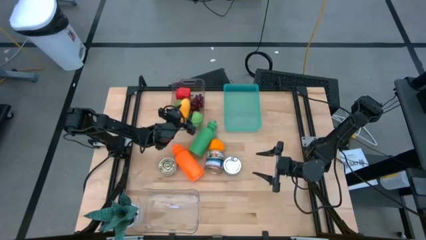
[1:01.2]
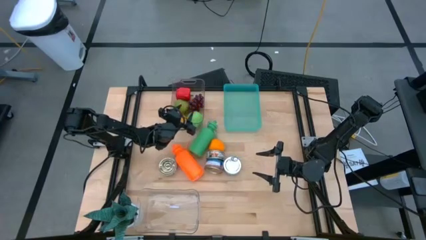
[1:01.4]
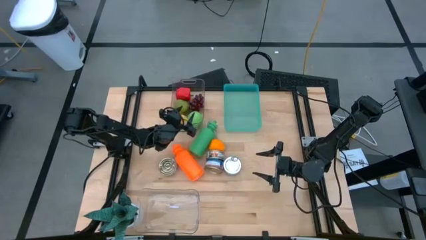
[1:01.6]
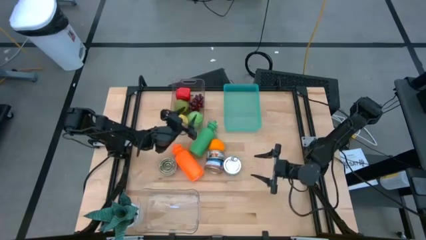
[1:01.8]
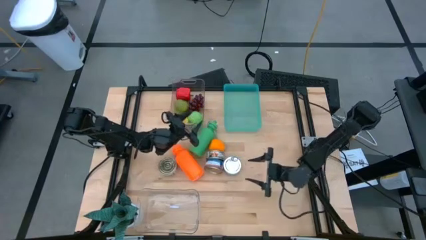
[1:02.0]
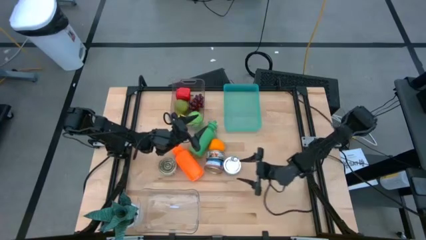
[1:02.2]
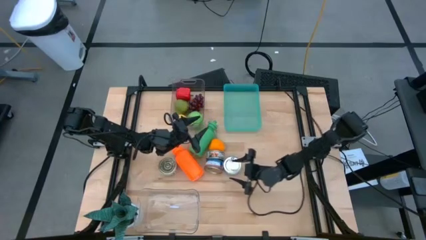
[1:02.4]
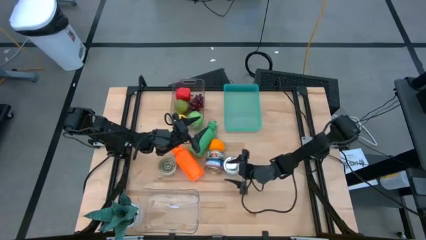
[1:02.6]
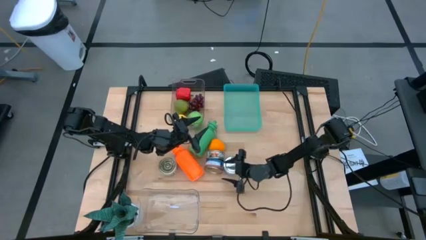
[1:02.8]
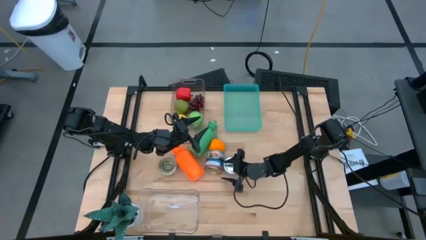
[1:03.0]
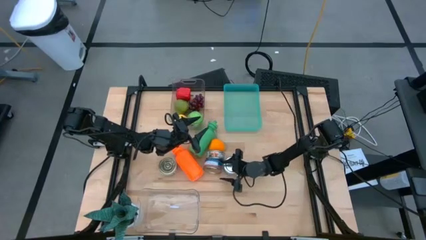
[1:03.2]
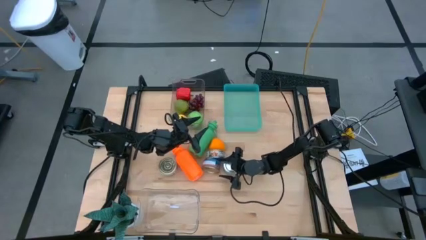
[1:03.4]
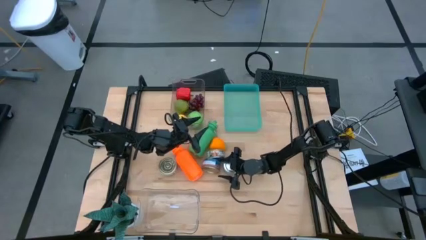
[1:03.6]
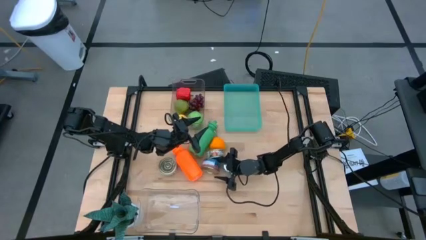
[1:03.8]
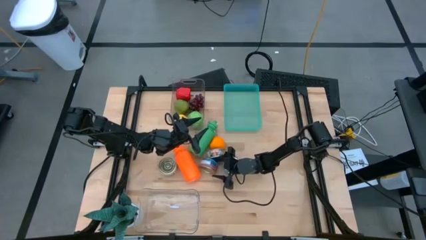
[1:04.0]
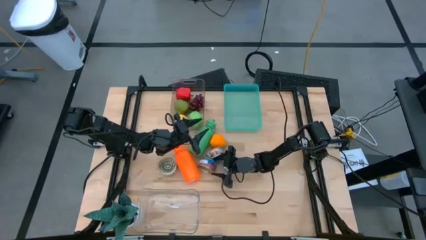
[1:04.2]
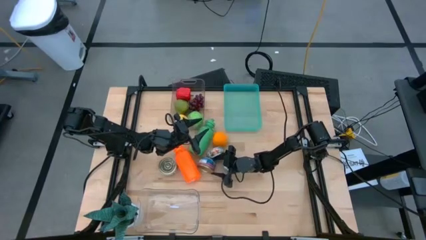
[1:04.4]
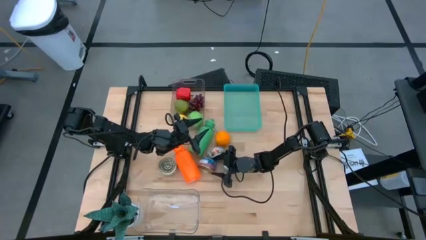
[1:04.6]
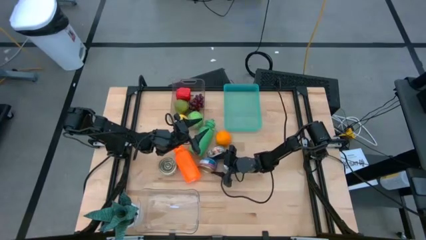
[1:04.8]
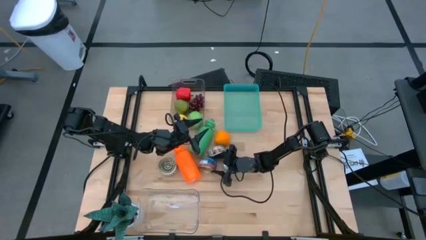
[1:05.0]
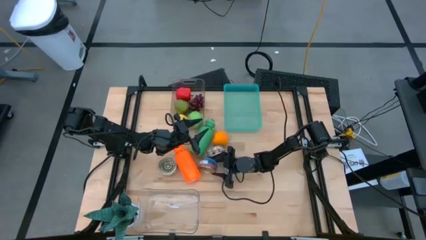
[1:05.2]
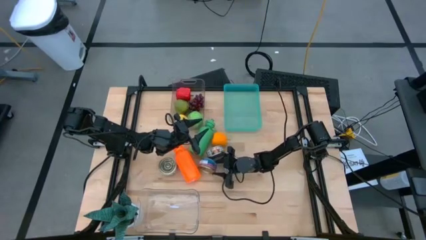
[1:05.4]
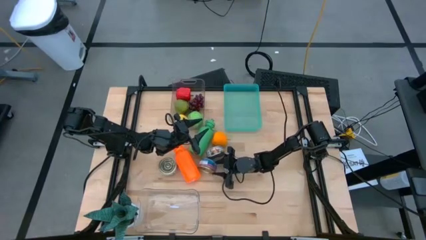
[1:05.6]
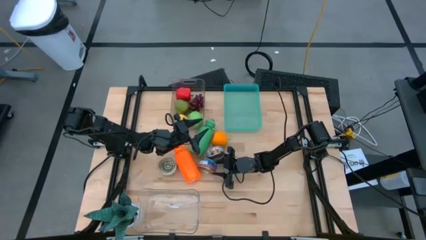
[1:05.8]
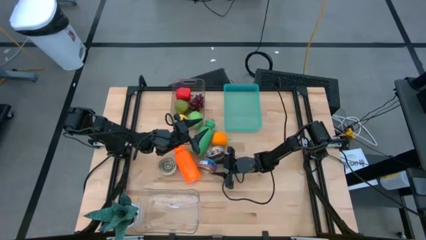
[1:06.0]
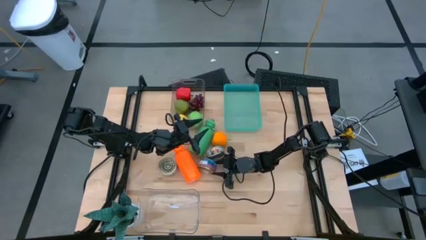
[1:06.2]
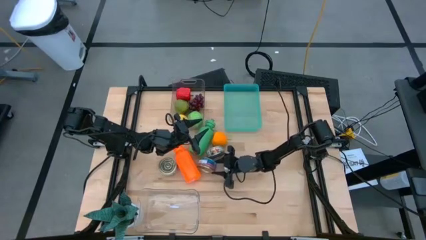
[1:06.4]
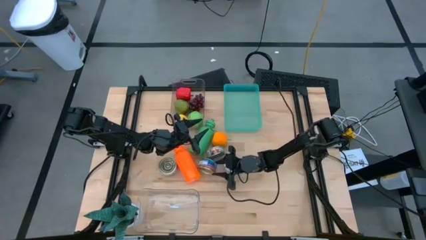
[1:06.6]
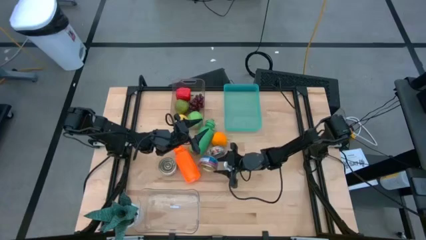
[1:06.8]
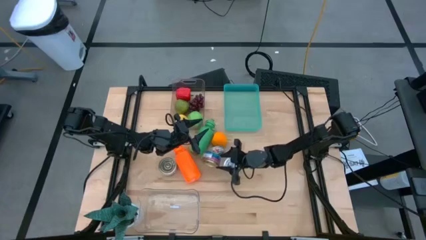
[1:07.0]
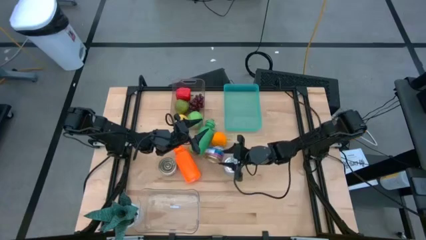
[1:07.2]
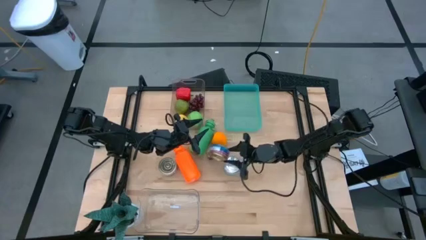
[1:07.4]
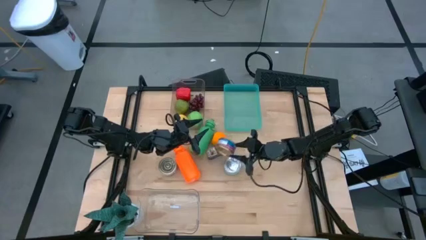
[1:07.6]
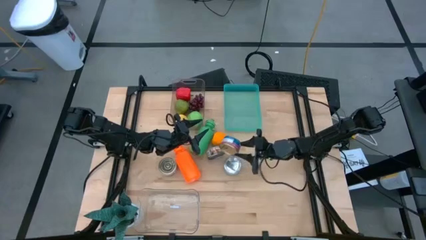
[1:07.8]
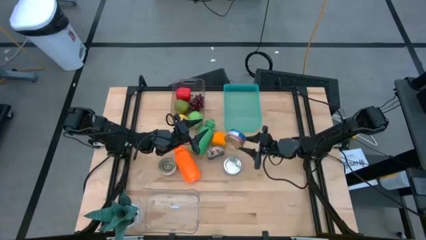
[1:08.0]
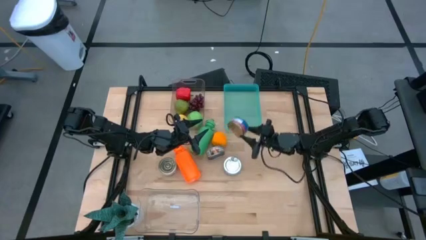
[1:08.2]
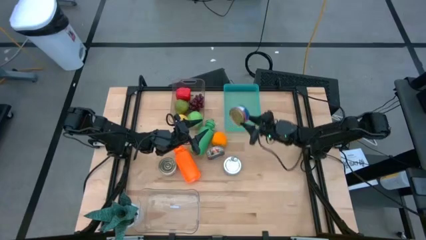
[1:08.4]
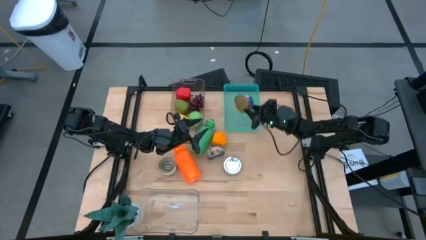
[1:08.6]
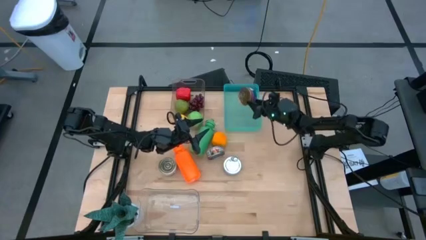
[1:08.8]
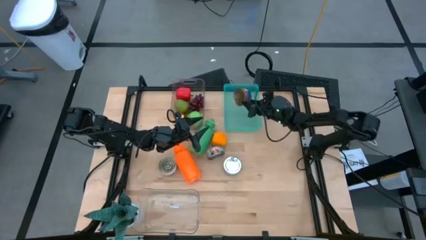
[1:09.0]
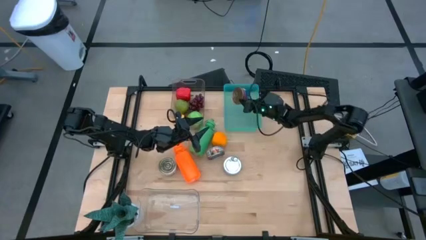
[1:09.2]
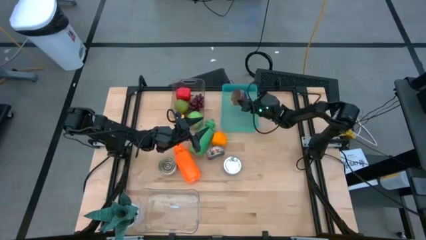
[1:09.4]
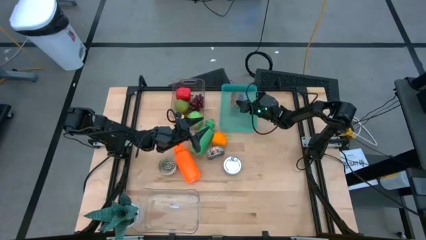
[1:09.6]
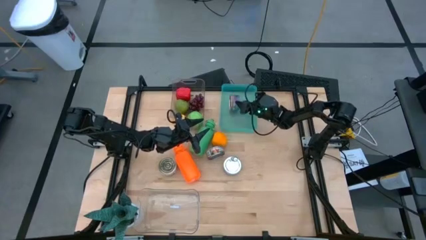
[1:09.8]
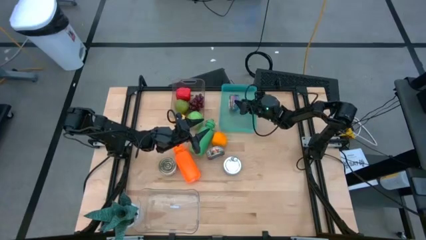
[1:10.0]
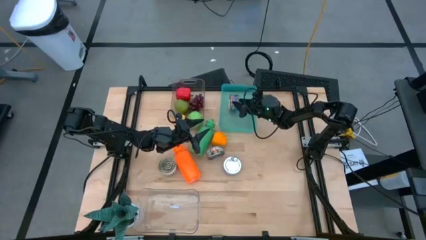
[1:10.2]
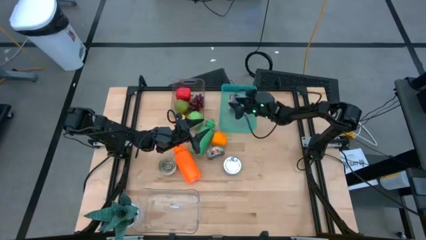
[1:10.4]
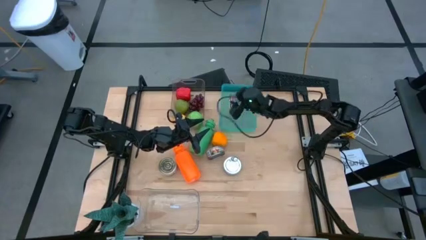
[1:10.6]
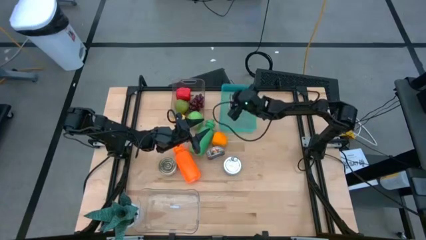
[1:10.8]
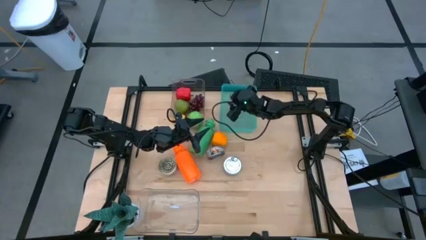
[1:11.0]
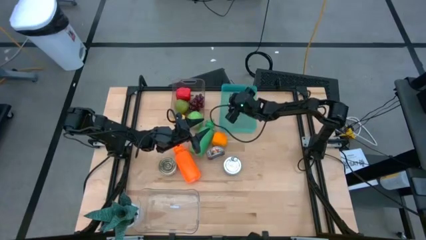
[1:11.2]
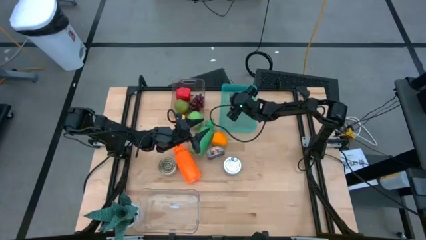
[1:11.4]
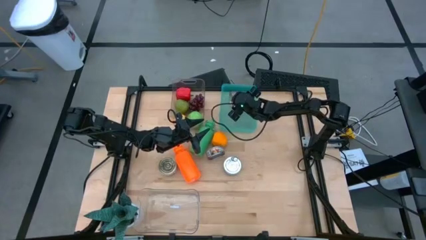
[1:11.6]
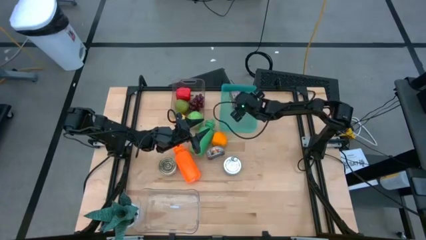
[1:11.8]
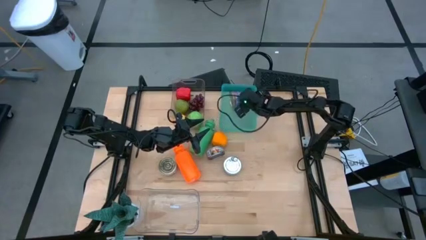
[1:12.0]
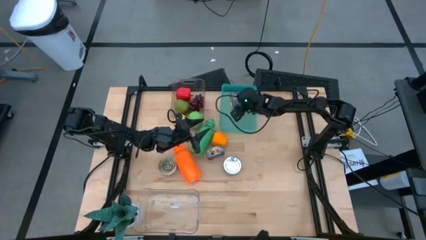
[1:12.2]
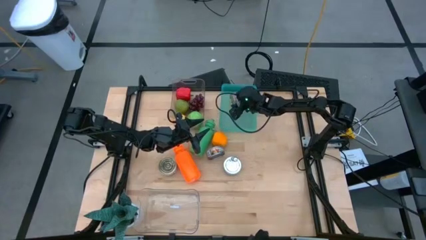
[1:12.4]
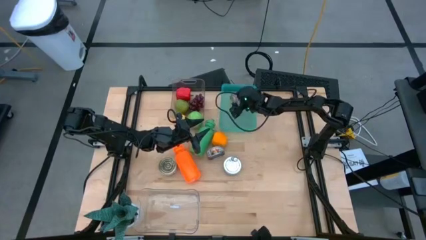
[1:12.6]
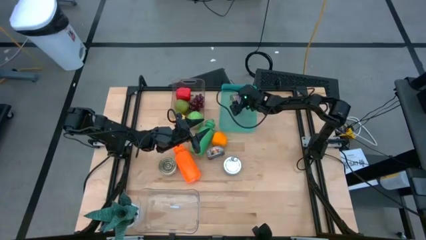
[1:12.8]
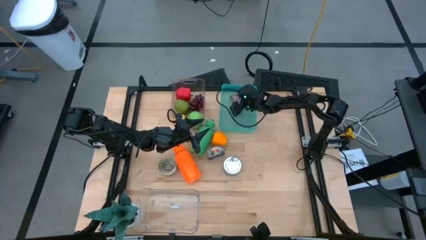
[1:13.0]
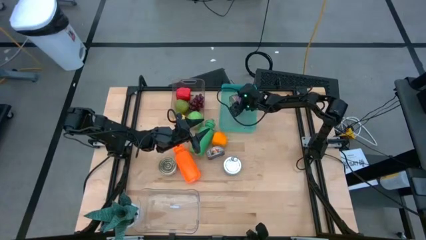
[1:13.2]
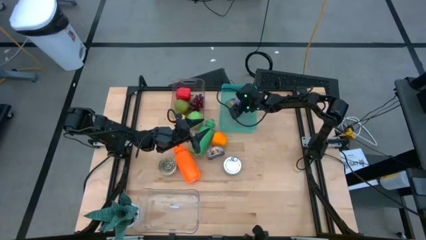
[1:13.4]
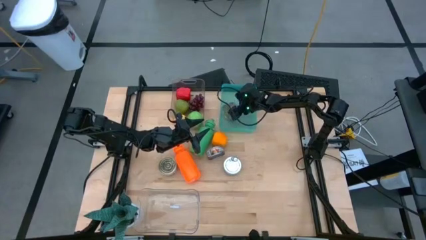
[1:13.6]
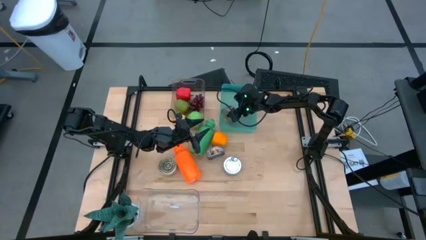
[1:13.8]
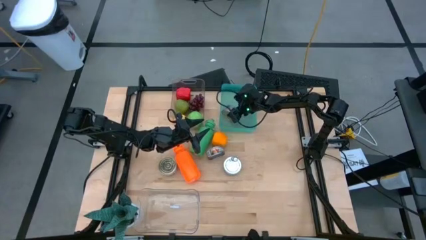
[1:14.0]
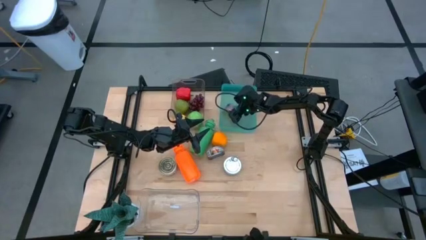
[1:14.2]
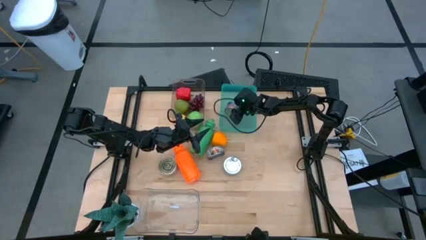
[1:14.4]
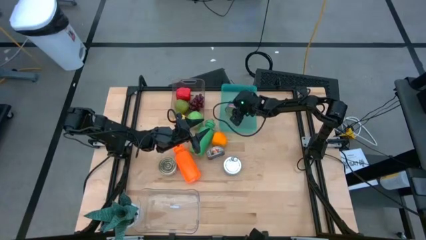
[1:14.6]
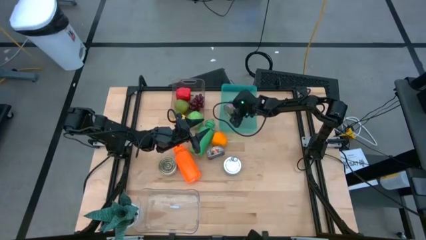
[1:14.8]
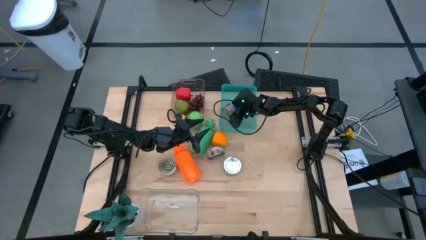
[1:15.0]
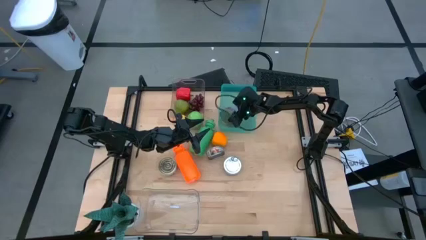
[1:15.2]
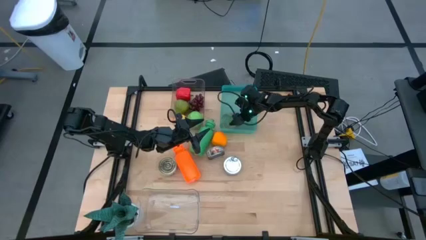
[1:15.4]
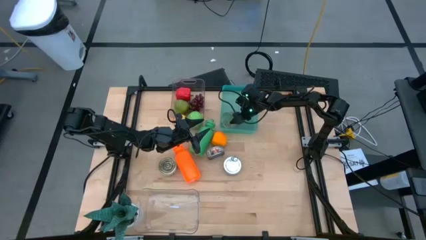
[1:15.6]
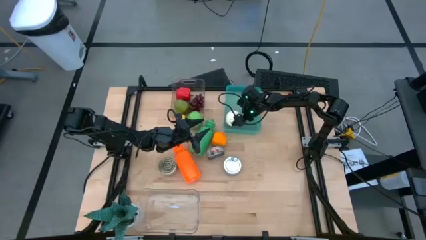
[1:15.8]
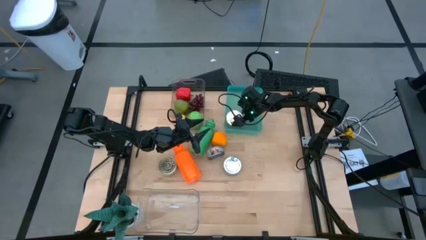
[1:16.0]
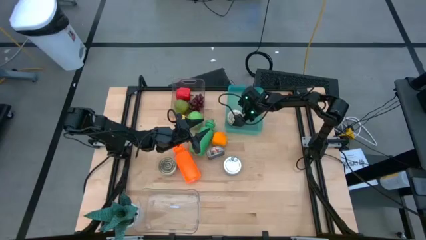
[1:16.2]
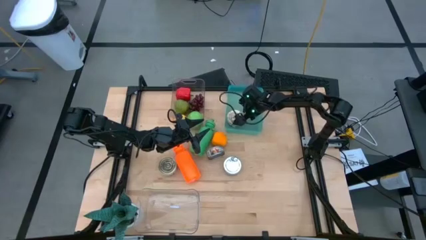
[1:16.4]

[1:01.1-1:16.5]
Task: Pick & Place Food Item
Put the right blue pink tuna can into the light blue bin

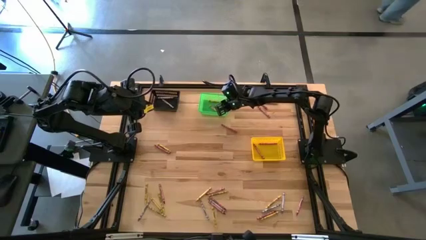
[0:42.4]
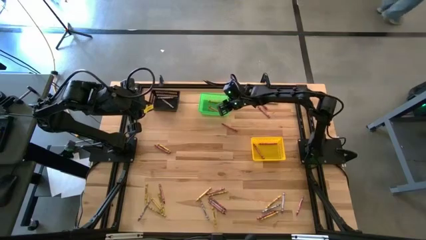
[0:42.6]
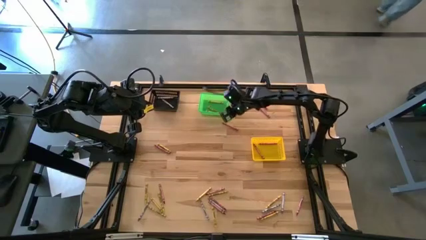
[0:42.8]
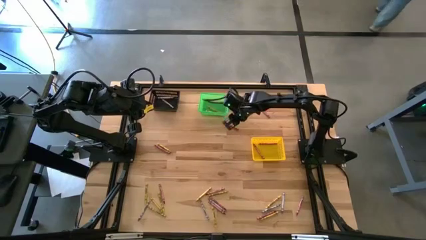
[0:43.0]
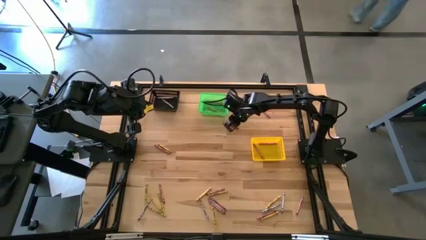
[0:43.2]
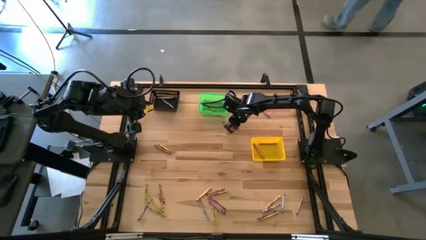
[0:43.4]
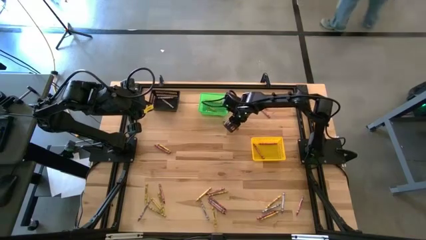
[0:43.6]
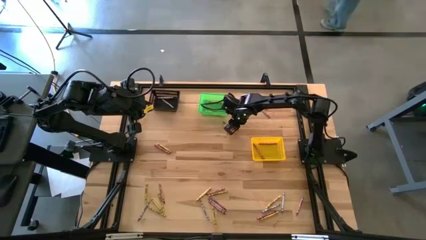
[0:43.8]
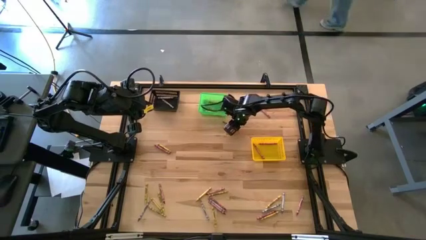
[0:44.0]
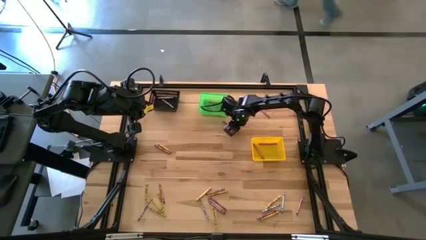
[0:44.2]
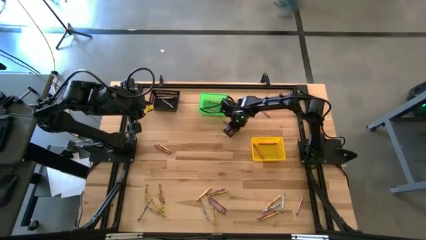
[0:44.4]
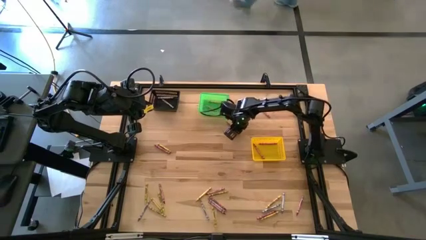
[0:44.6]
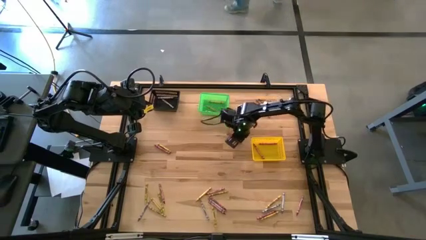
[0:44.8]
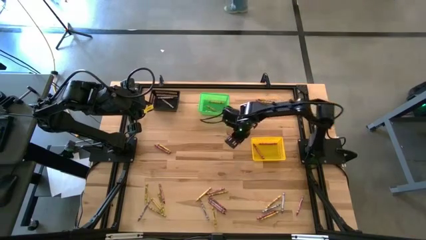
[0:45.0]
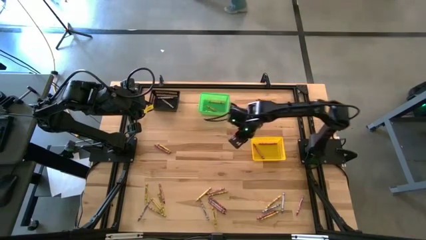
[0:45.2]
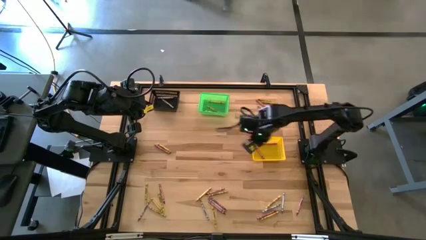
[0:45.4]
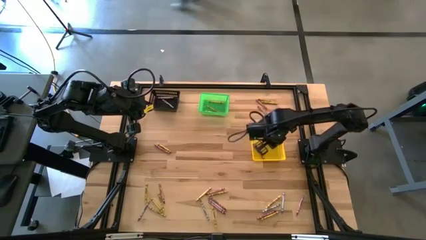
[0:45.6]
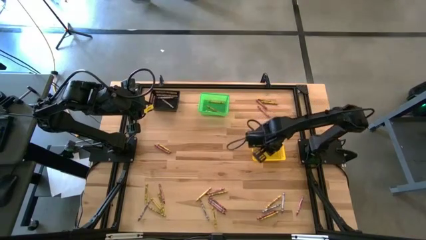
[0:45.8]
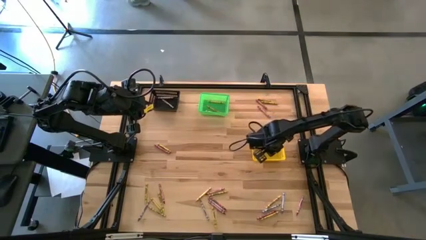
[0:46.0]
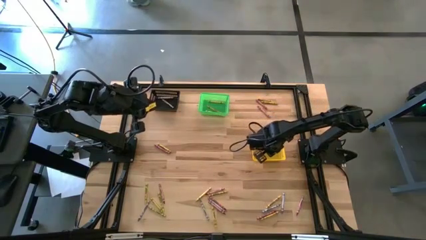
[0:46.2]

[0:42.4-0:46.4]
Task: Sort crayons
Put the red crayon into the yellow basket
